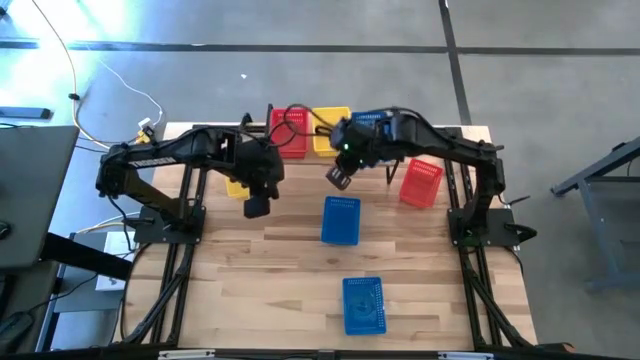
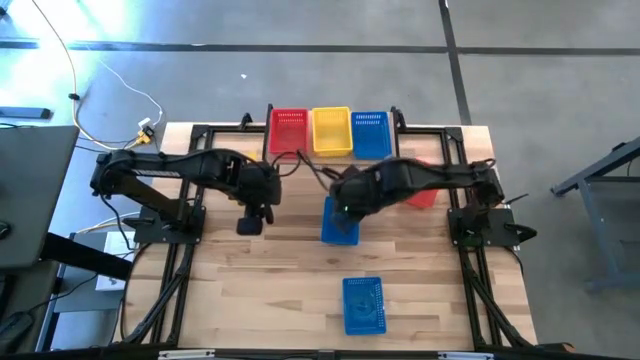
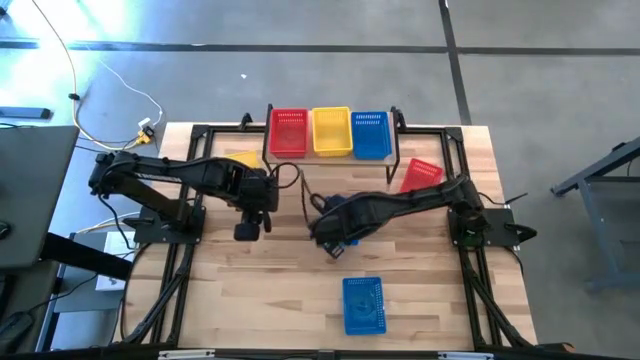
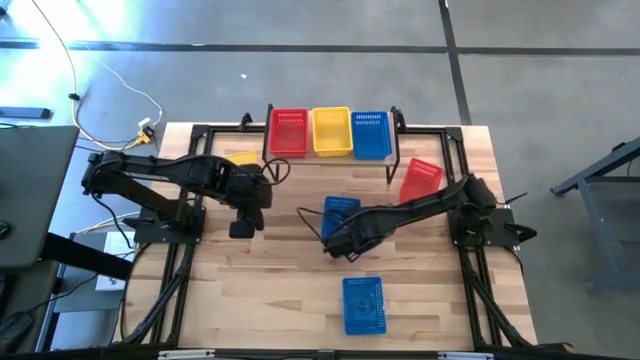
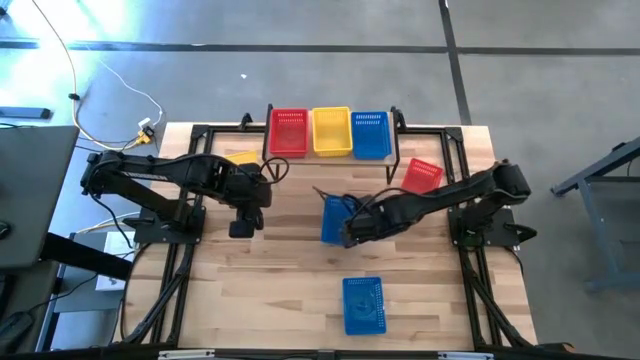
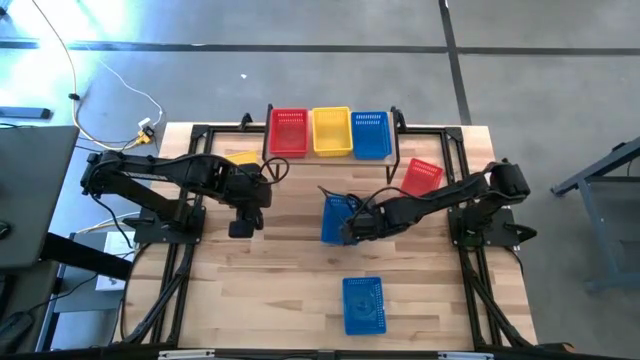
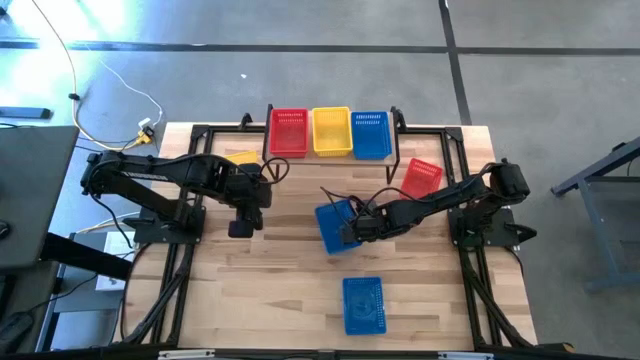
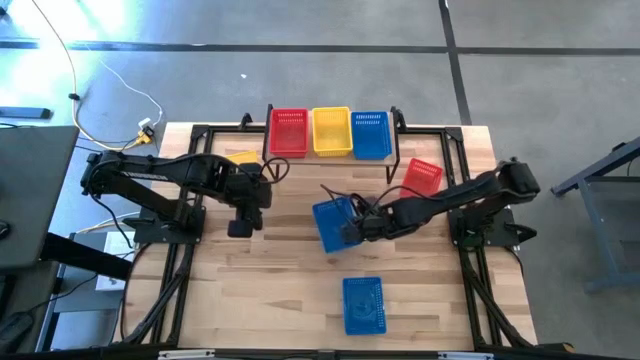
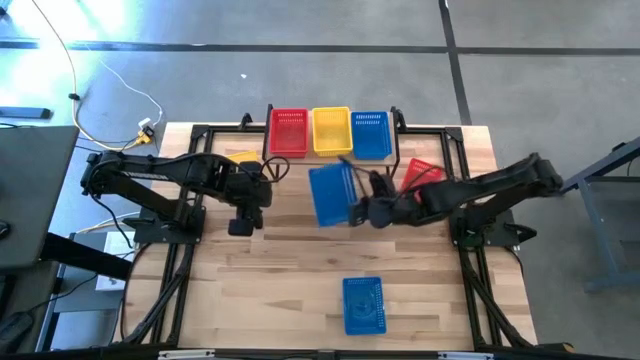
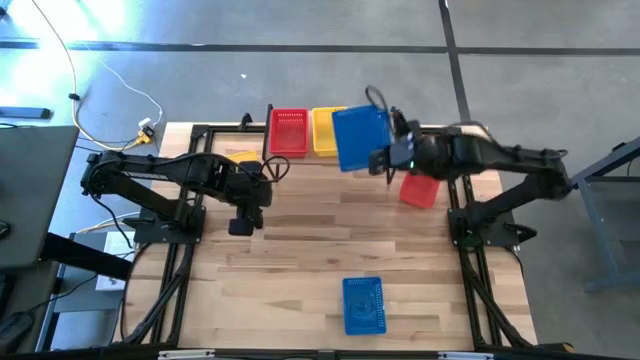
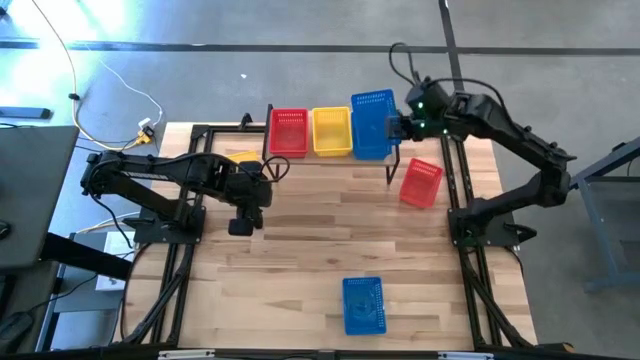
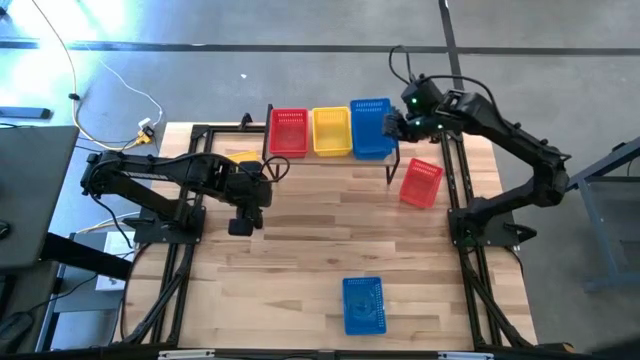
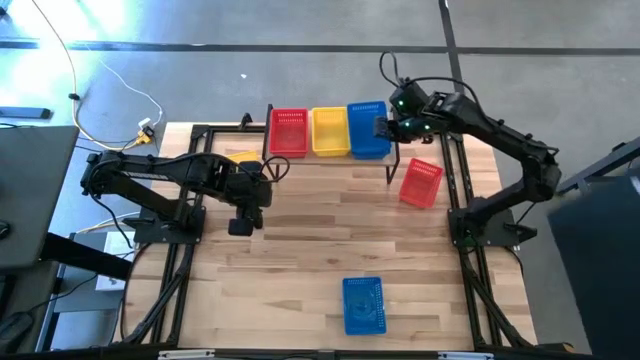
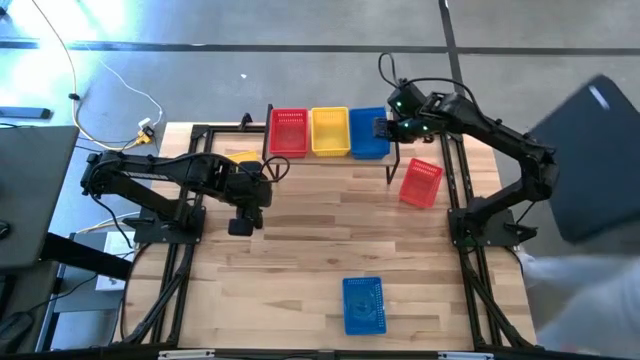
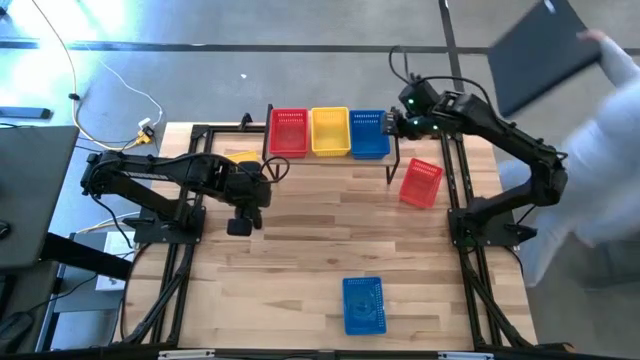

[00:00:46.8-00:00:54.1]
Task: Stack baskets on shelf by color
Stack the top blue bin on top of the blue bin on the shelf

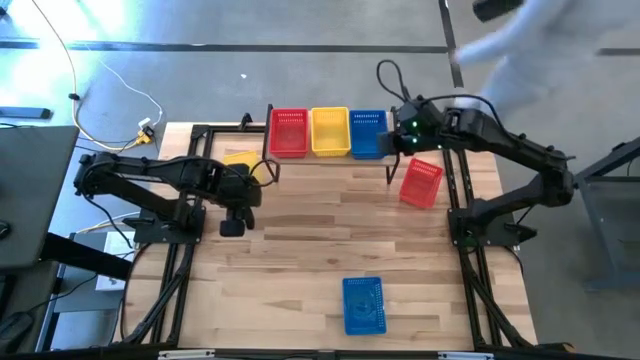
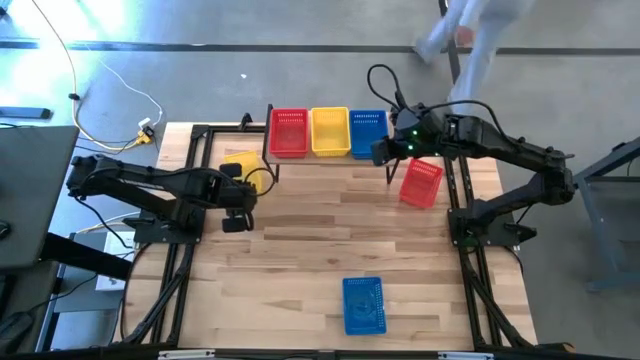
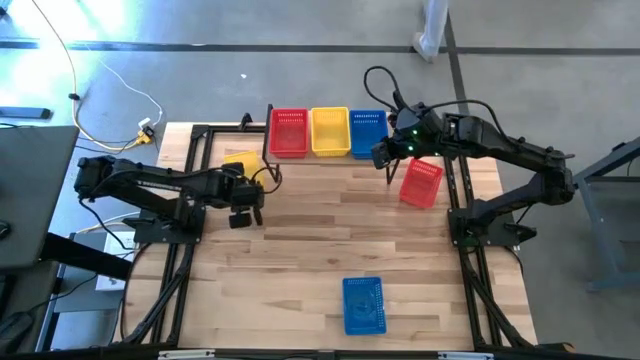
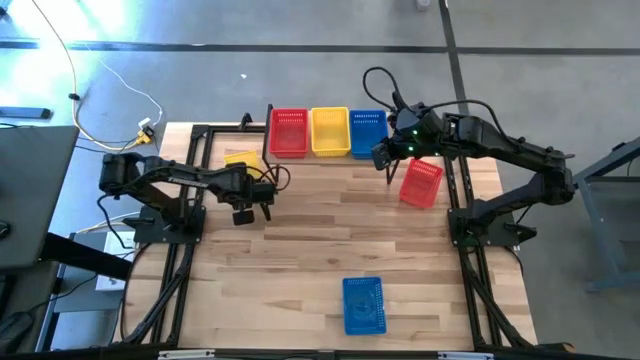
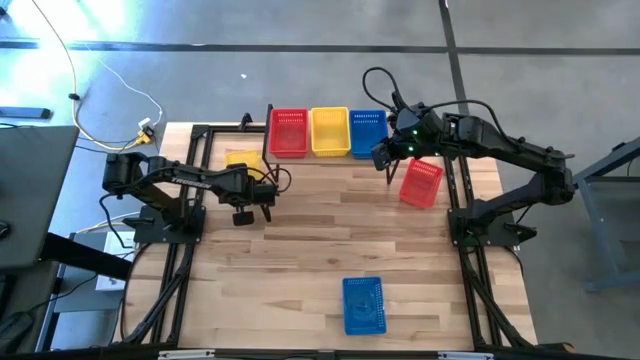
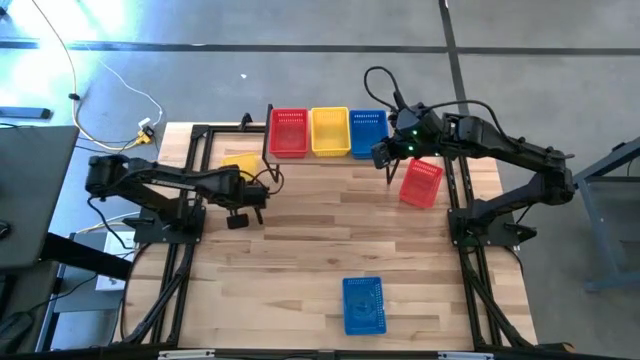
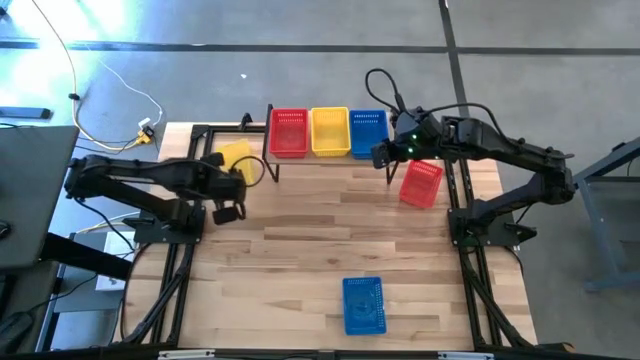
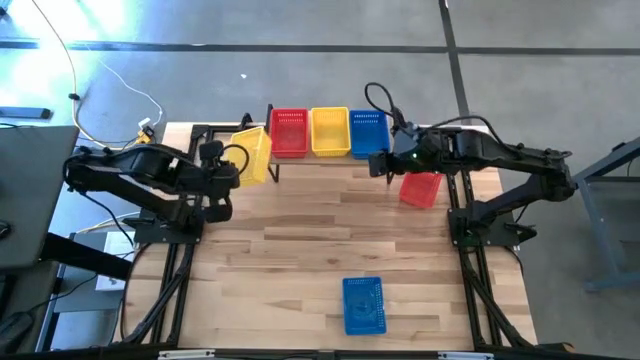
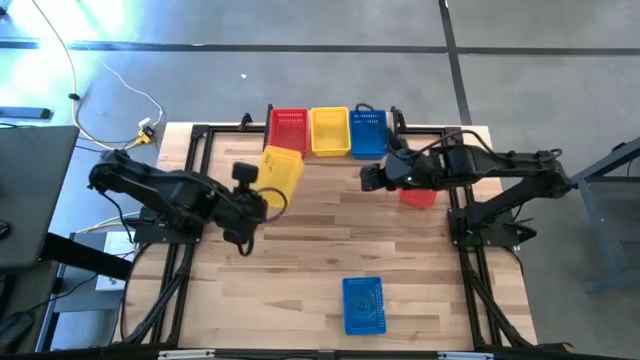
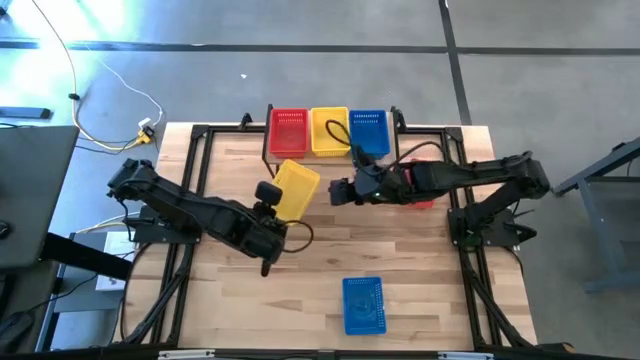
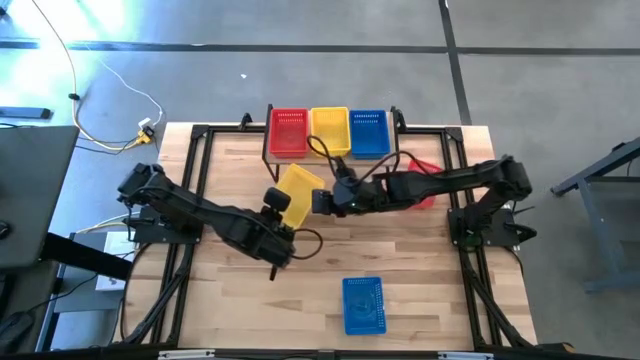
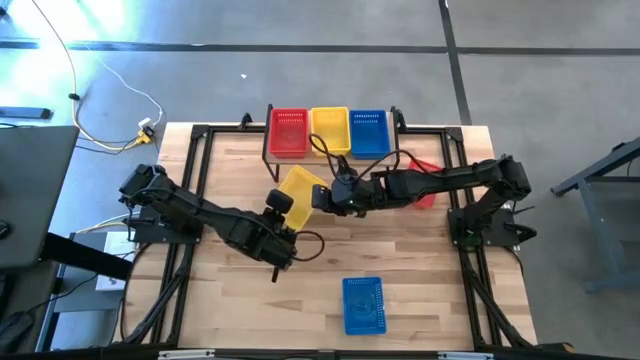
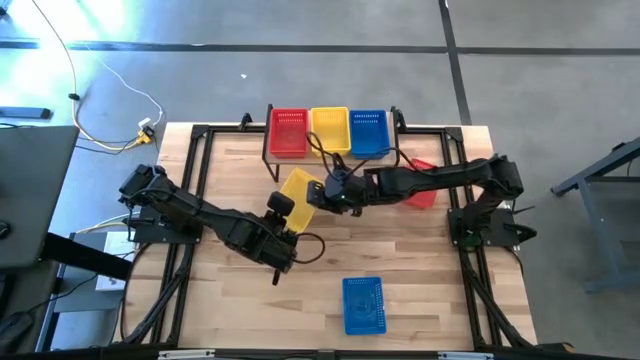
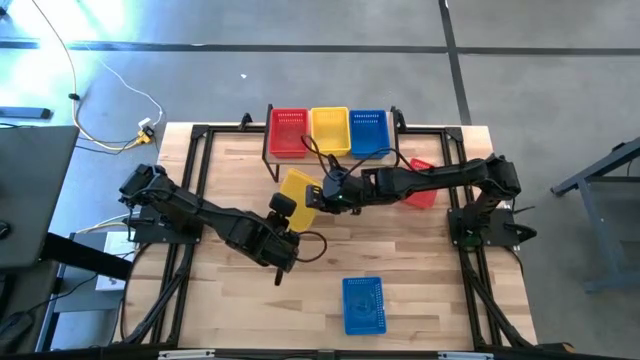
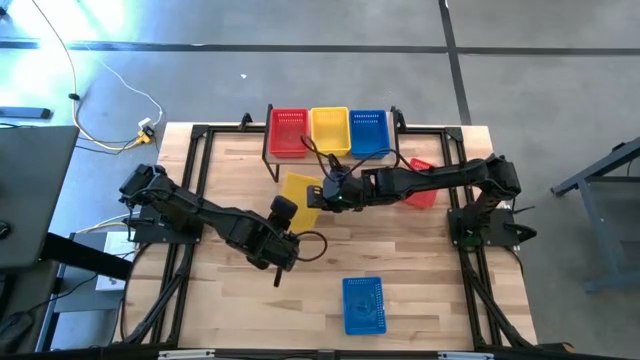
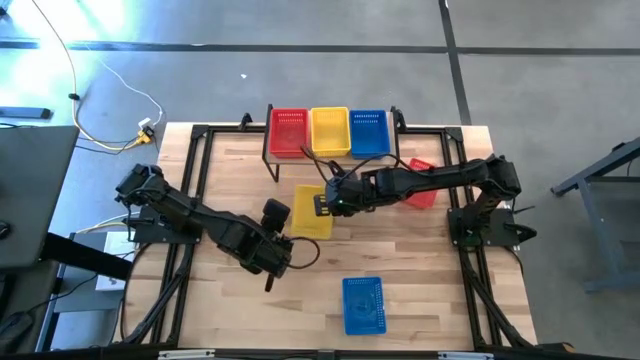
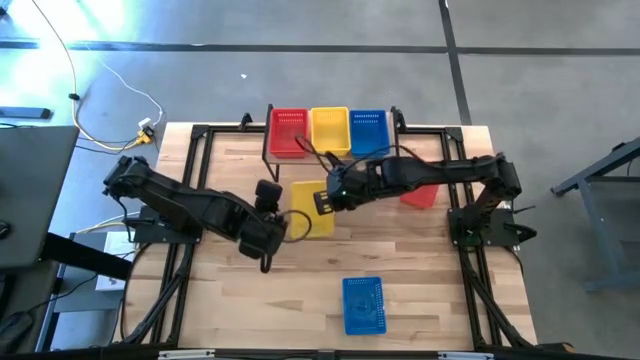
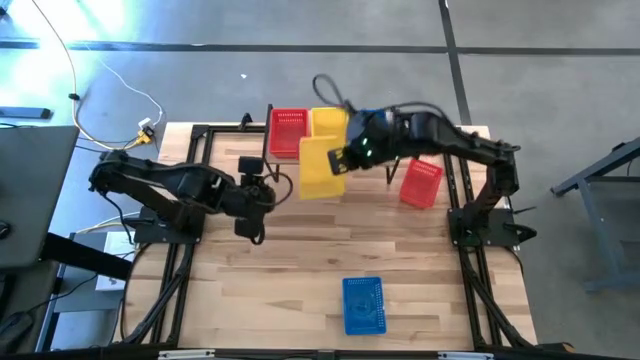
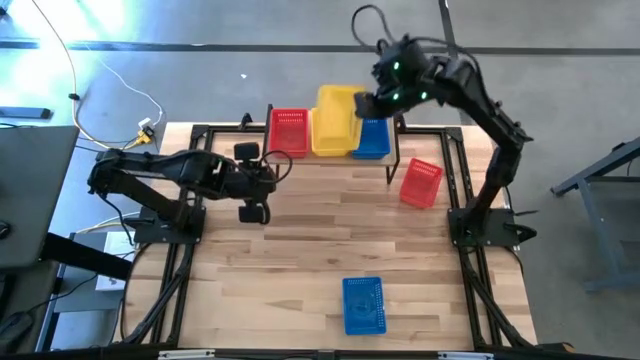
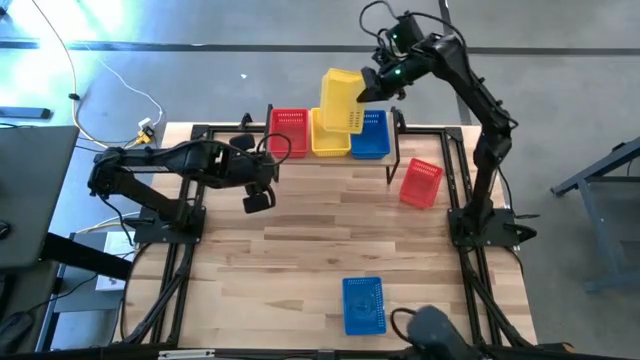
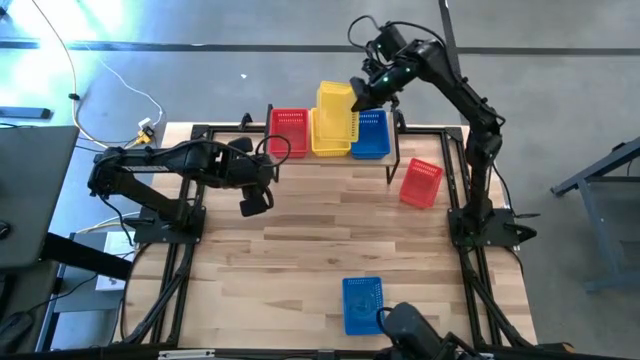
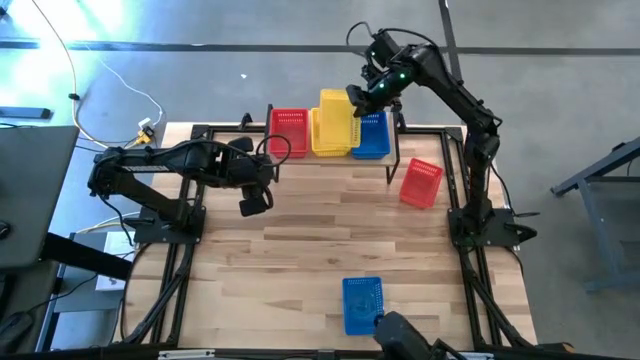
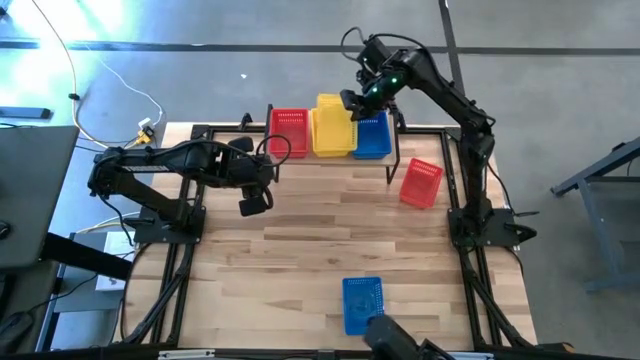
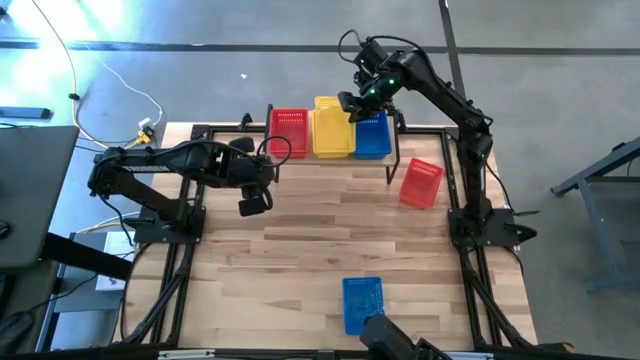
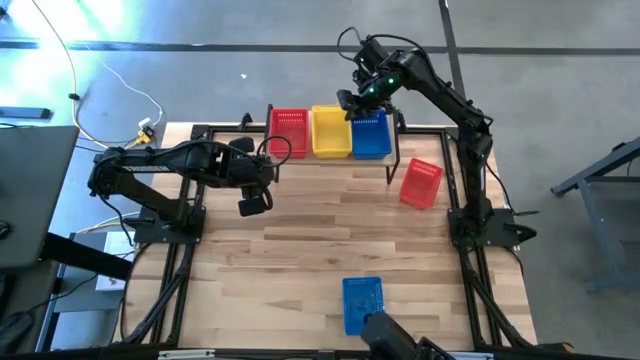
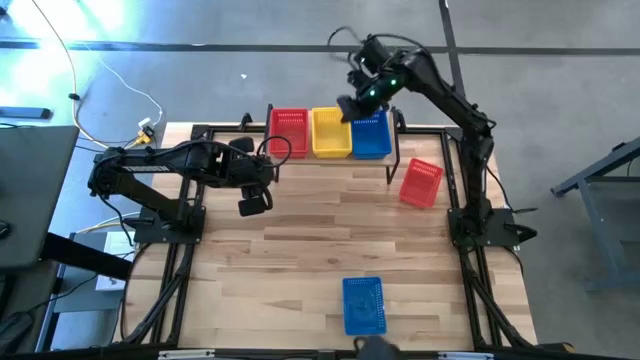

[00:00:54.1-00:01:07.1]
Stack the yellow bin on top of the yellow bin on the shelf

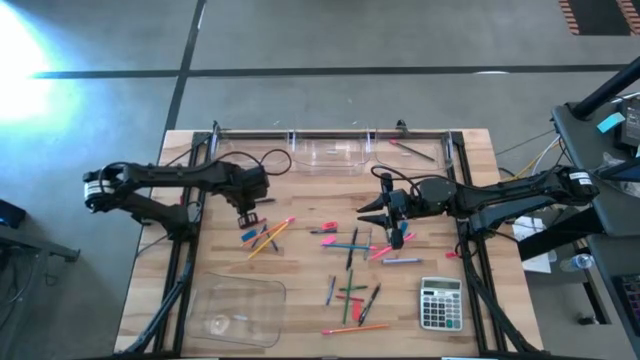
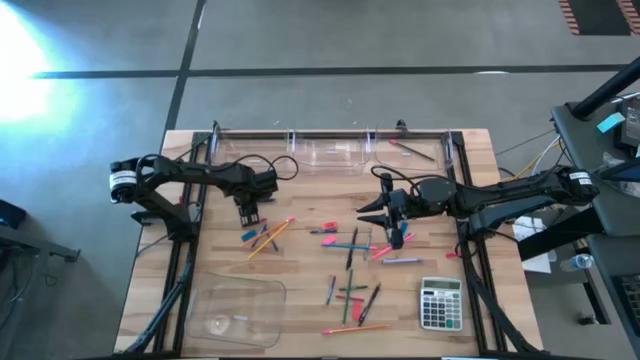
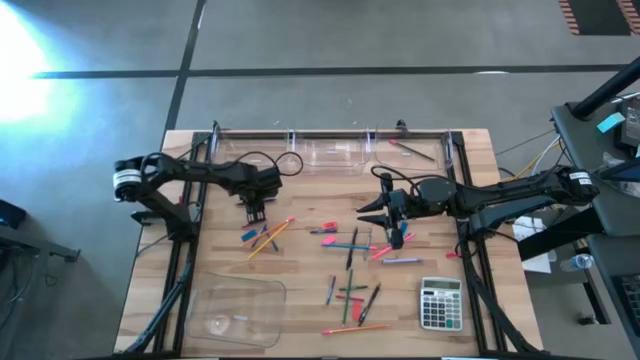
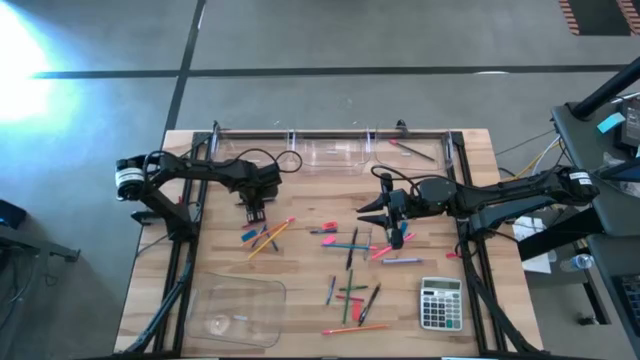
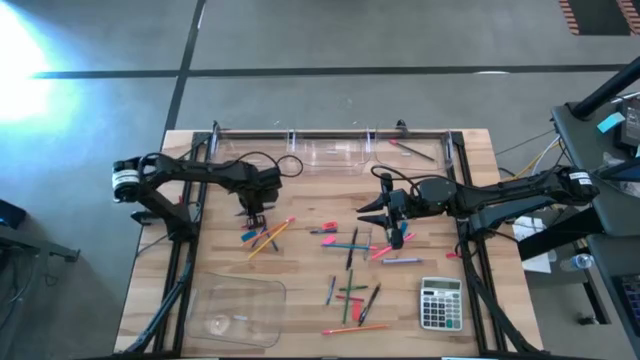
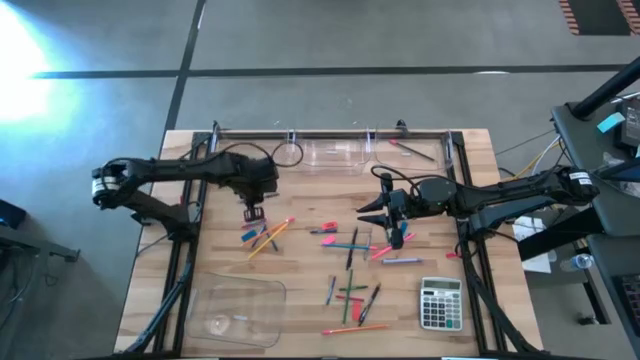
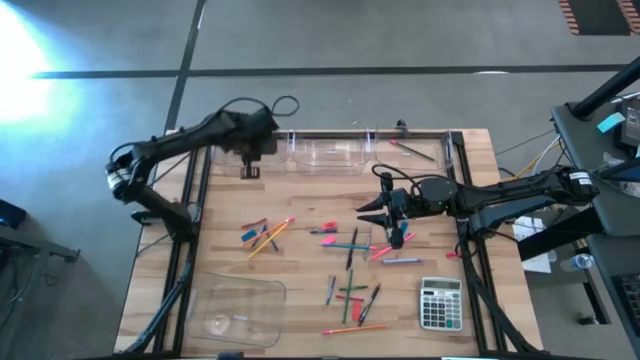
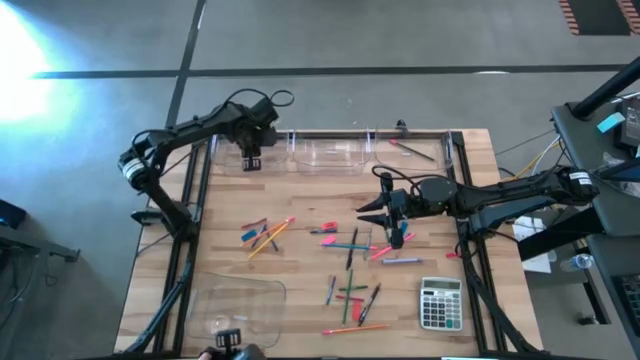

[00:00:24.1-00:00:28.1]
Task: Sort crayons/erasers/pens/pencils in bins
Put the blue pen into the top left transparent bin
